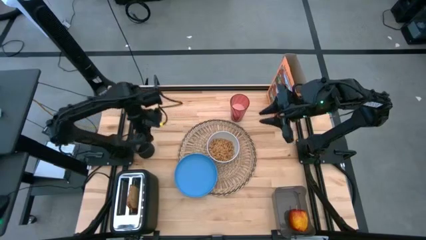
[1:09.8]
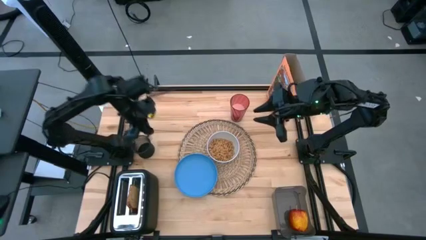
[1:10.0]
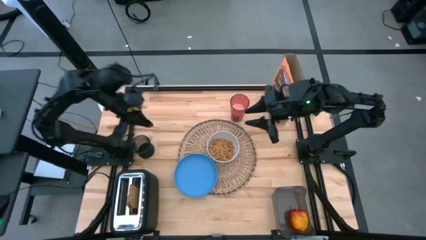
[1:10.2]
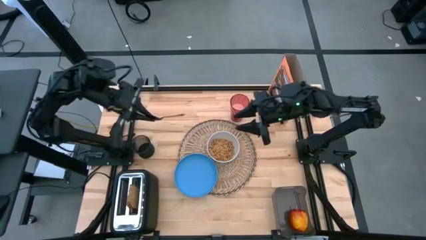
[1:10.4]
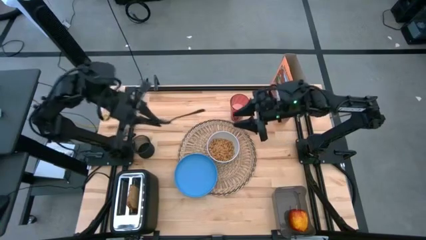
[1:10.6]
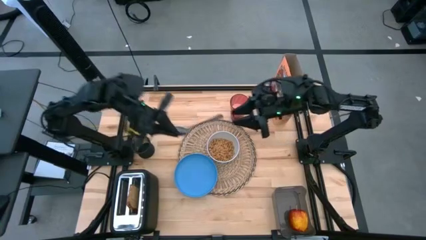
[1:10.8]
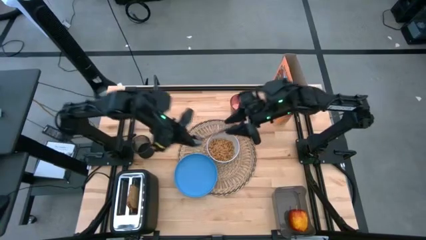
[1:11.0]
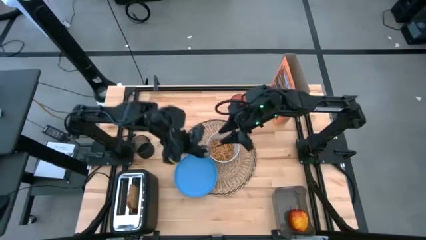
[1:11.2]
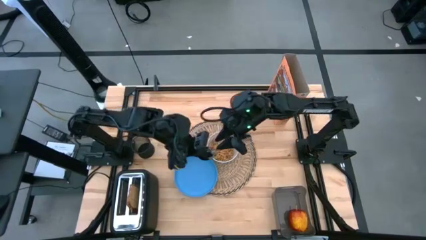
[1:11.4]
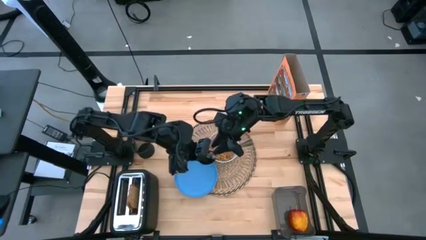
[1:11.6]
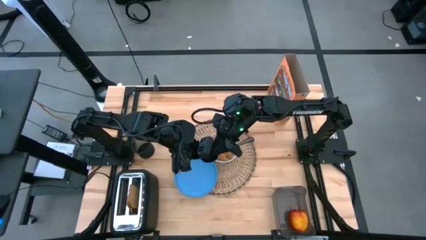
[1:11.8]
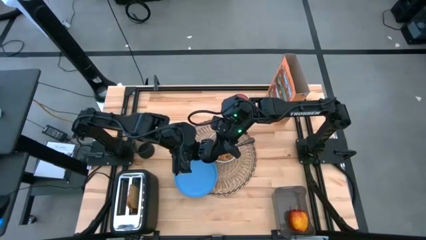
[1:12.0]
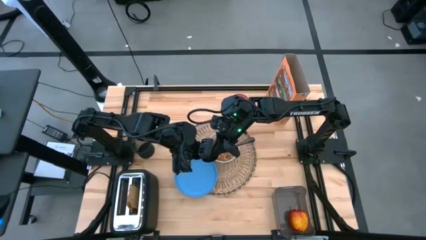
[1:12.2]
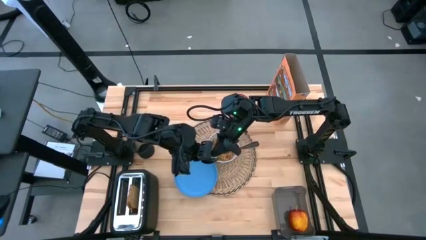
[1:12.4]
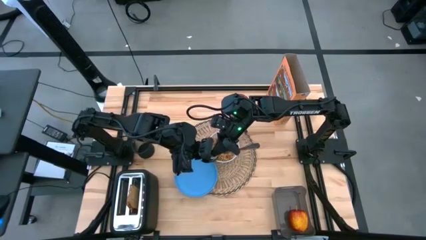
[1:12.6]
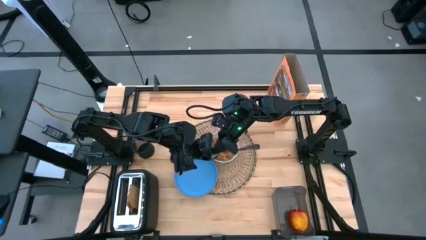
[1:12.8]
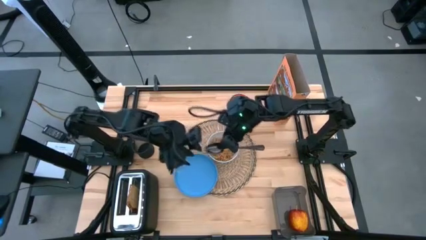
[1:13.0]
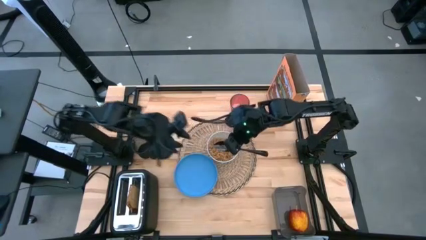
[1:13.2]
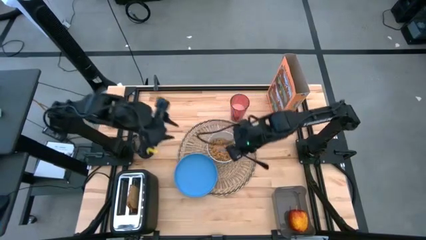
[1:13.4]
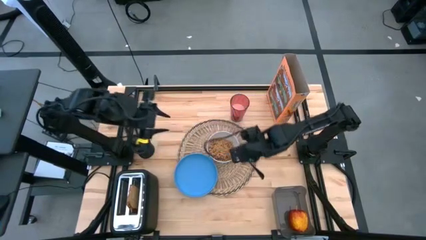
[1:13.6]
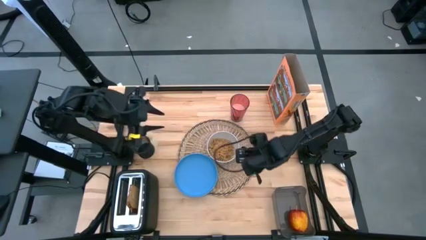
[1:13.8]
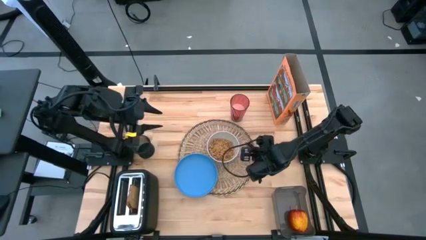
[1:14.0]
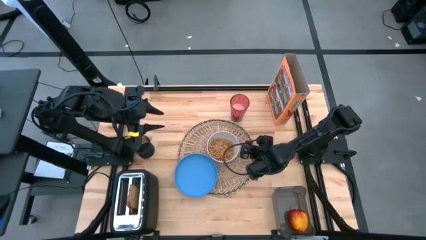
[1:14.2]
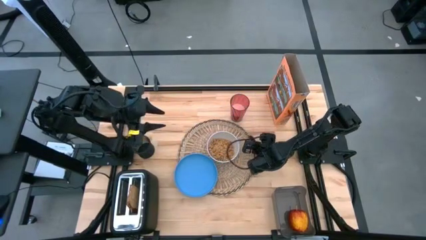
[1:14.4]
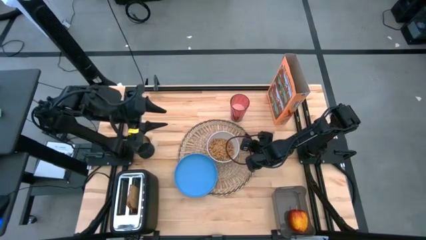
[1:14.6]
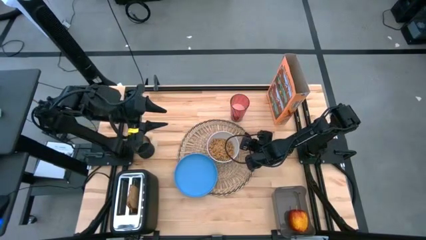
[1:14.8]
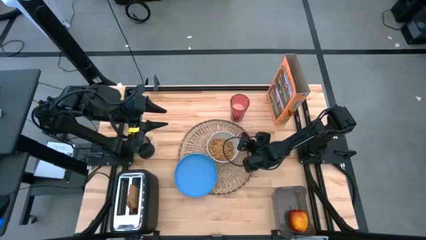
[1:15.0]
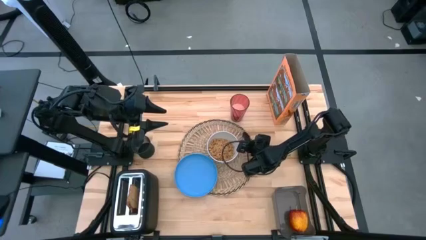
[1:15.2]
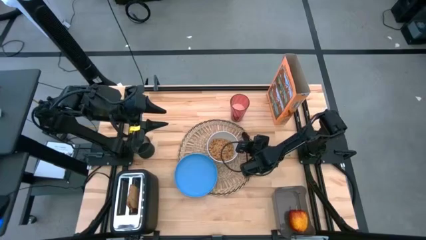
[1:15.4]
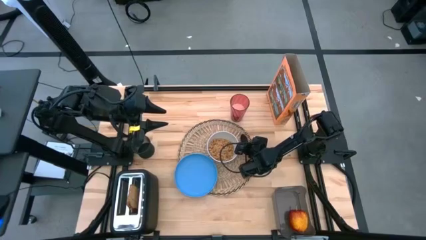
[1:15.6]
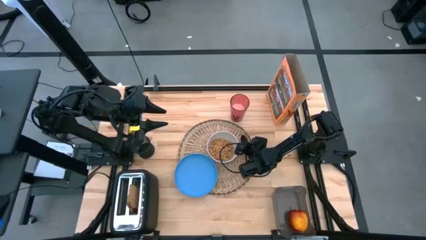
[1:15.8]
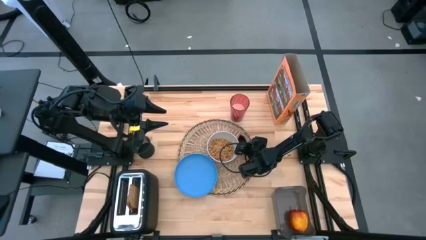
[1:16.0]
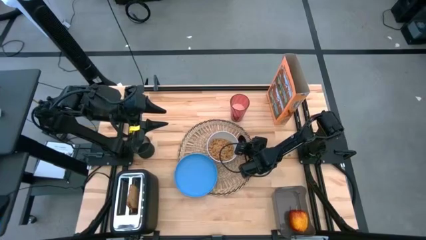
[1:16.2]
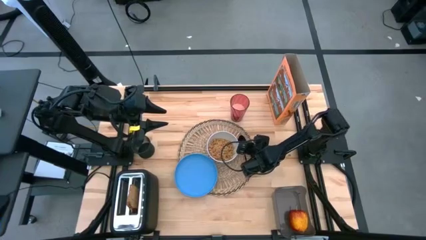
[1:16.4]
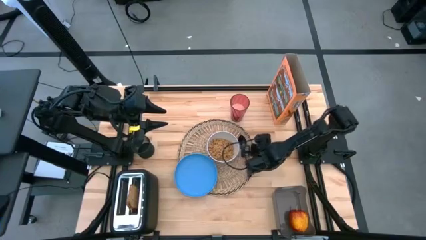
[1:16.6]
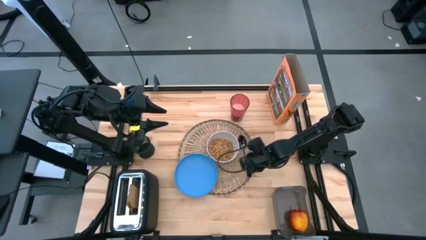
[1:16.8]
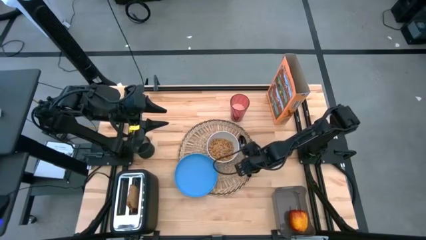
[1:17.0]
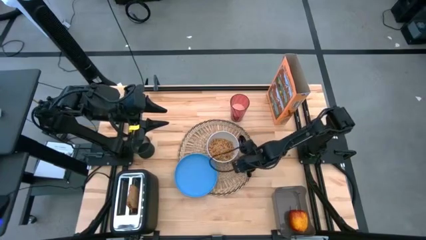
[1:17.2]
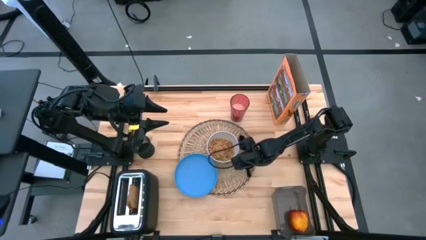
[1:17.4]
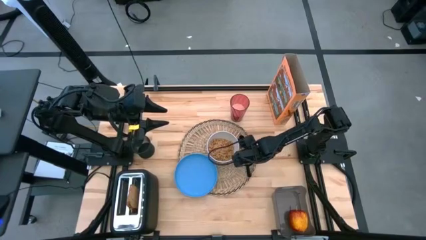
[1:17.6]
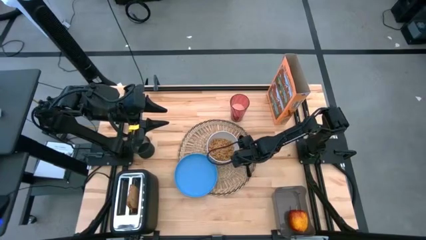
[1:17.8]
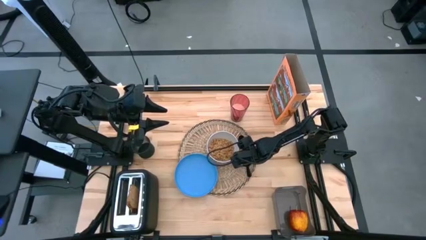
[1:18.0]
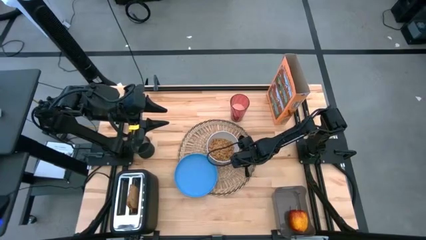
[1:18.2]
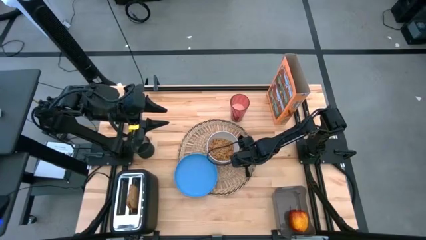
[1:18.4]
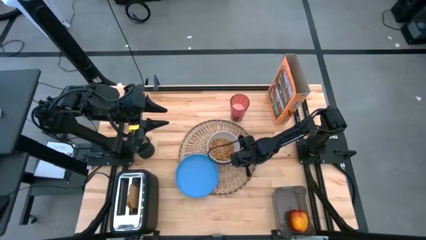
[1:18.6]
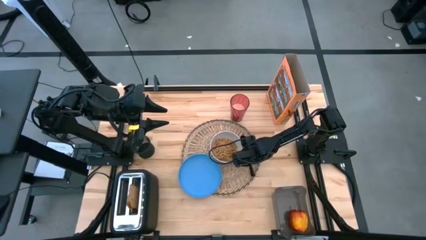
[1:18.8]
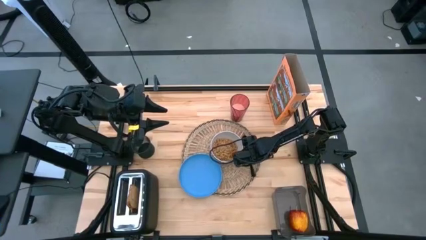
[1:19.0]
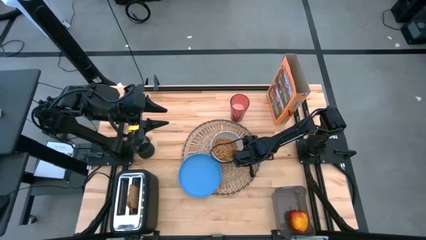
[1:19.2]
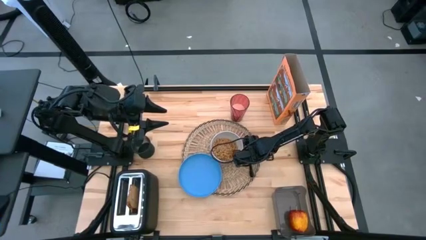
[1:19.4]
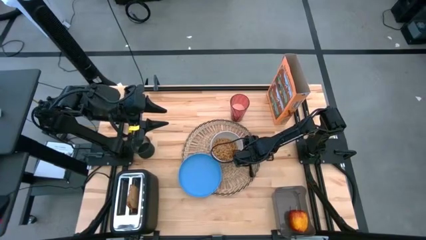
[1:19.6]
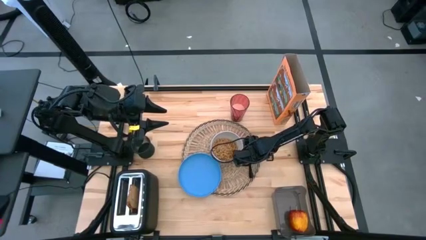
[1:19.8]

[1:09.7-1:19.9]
Task: Arrange a breakfast setting
Put the spoon on the right side of the white bowl

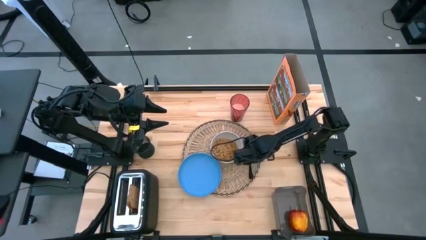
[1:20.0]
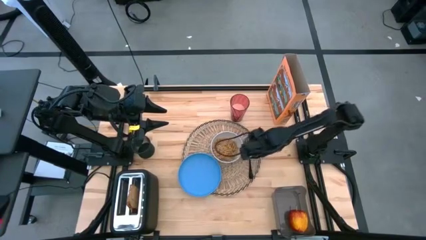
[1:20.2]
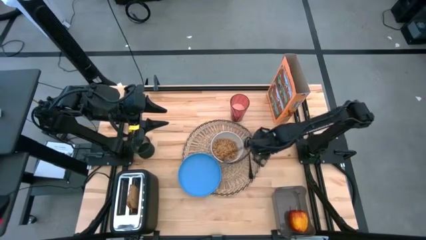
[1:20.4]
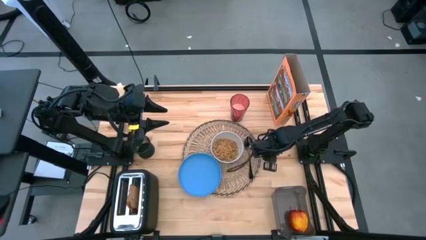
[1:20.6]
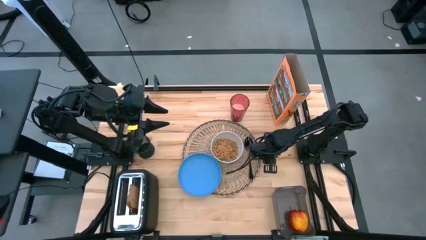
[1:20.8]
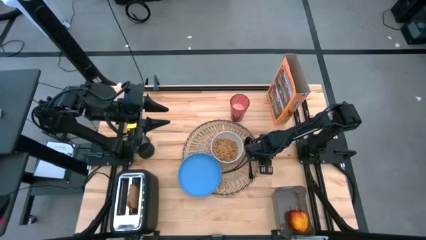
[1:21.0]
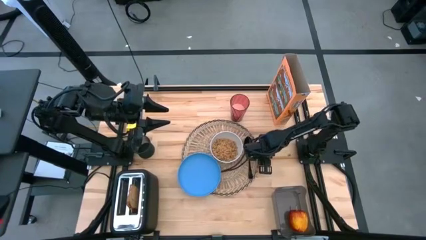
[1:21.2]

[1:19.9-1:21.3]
Adjust the gray table mat

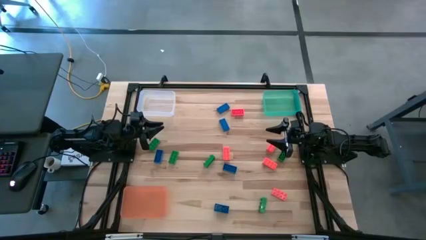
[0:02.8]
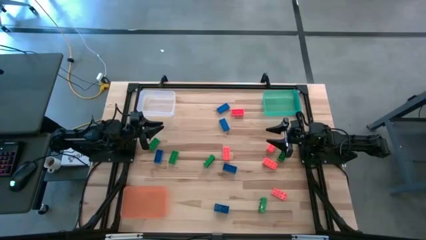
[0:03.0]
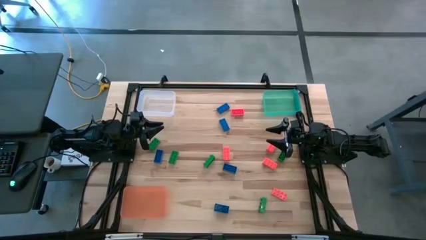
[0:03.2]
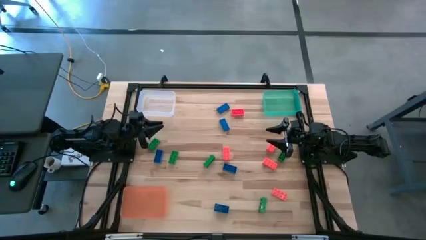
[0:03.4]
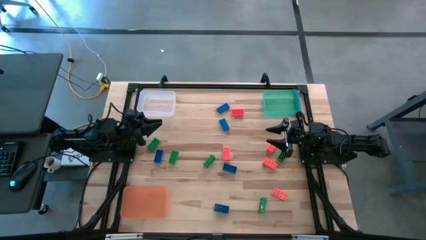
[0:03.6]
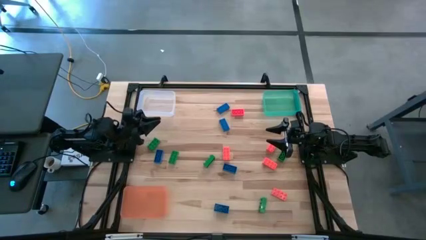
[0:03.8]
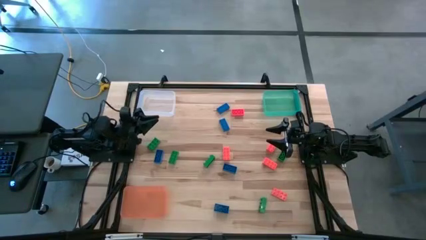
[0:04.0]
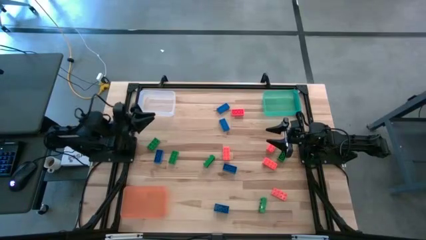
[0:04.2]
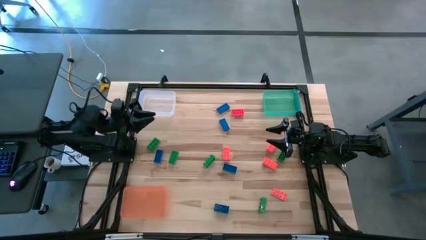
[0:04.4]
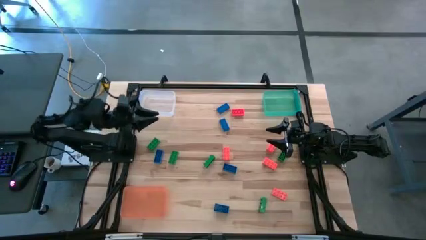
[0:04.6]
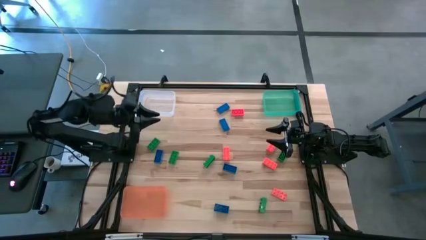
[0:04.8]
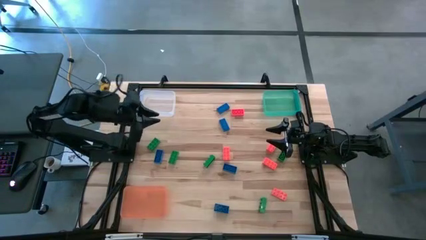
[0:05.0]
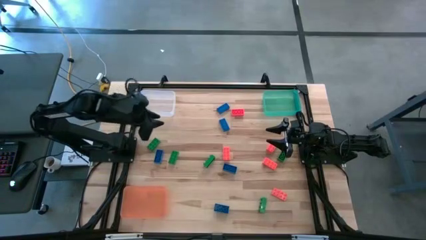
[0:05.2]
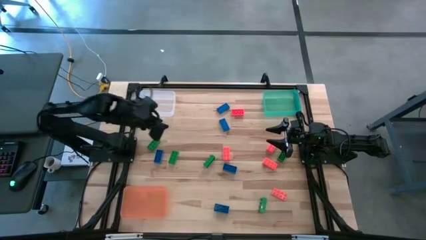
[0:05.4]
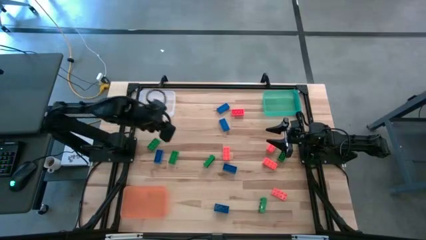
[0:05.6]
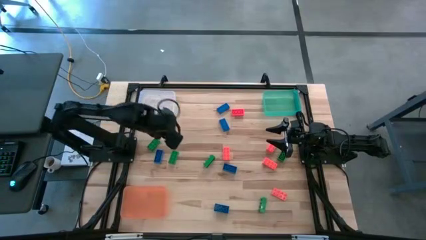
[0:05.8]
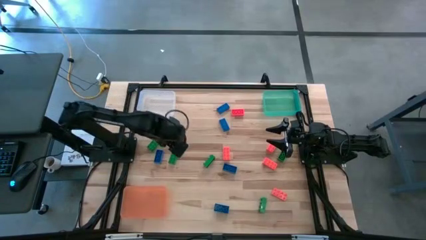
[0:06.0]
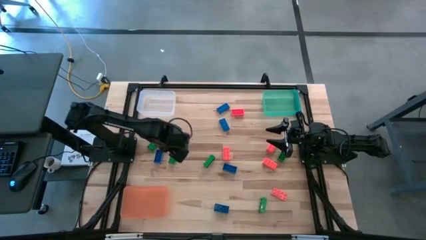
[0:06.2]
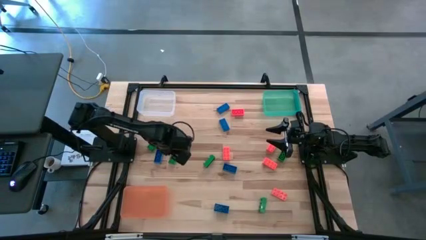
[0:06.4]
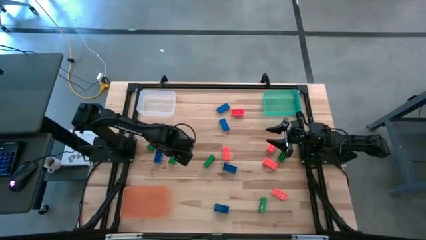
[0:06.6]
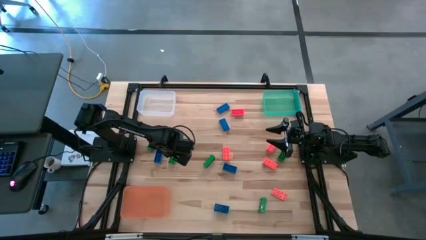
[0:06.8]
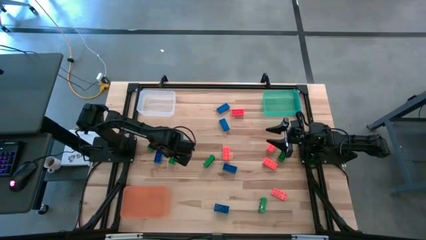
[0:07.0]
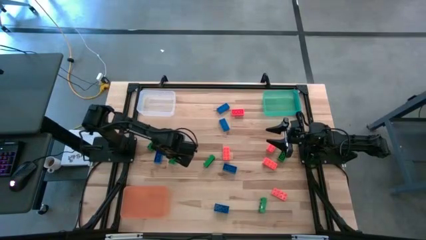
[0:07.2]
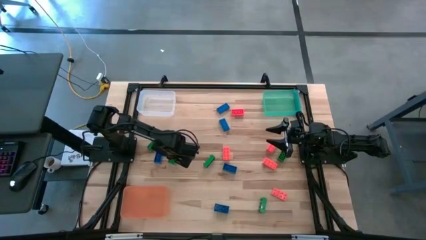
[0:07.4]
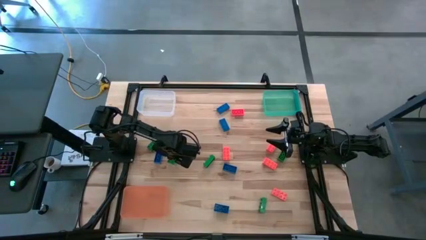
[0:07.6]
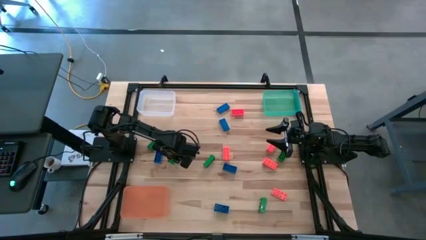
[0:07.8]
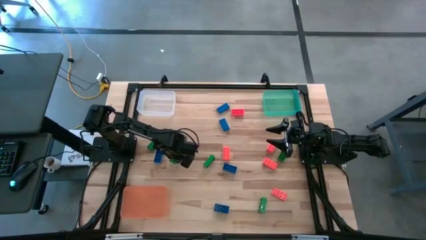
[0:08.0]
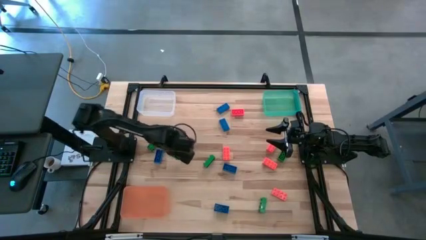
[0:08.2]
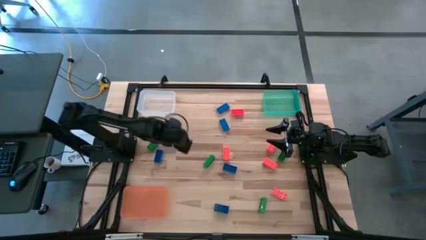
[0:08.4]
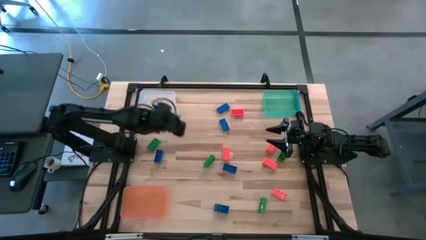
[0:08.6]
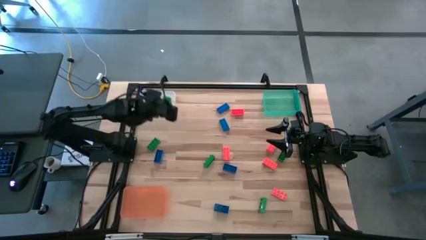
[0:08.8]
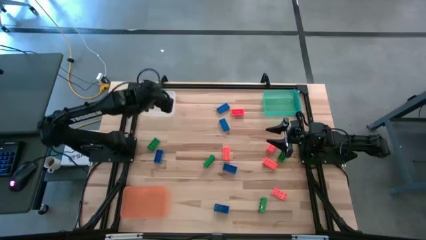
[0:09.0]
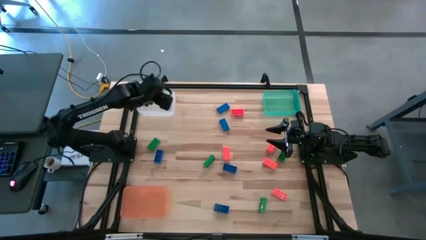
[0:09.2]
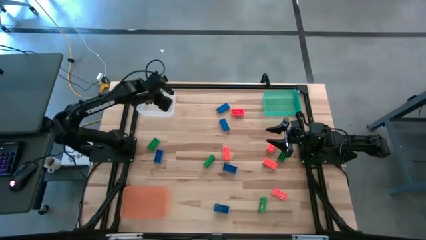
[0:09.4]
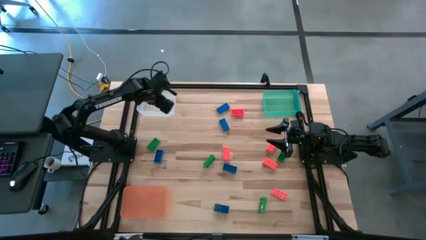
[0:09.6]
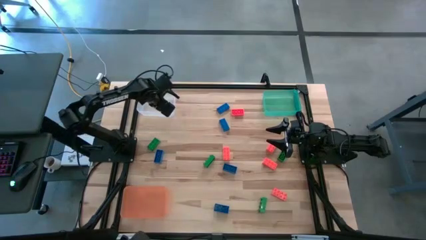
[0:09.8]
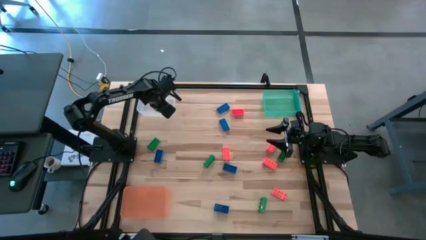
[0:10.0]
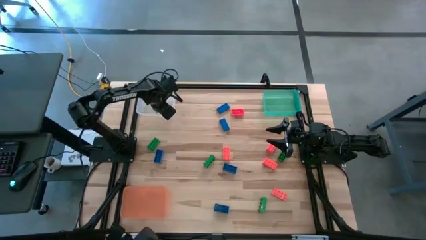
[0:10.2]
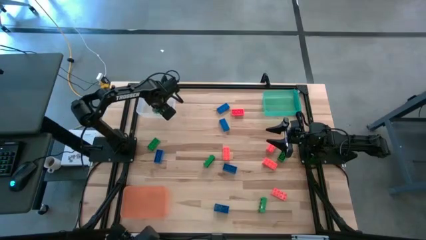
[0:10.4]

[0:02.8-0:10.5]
Task: Sort & place blocks by color
Put the green game piece into the white bin
